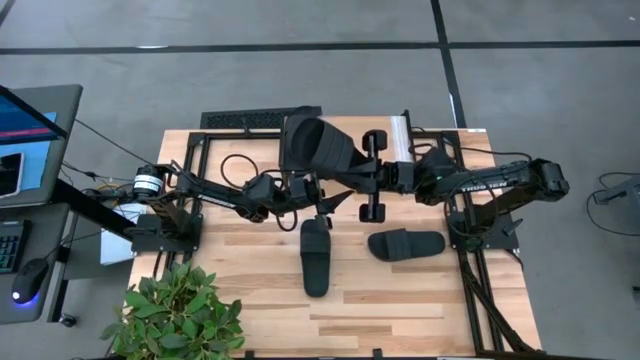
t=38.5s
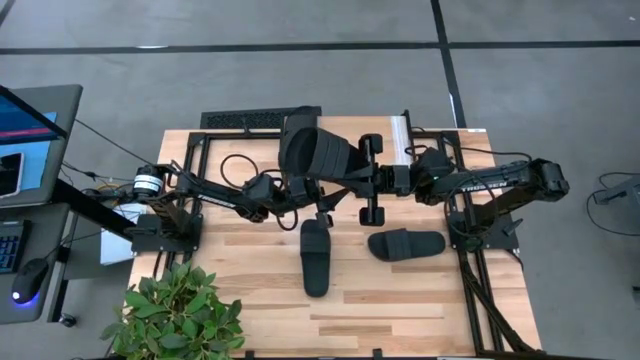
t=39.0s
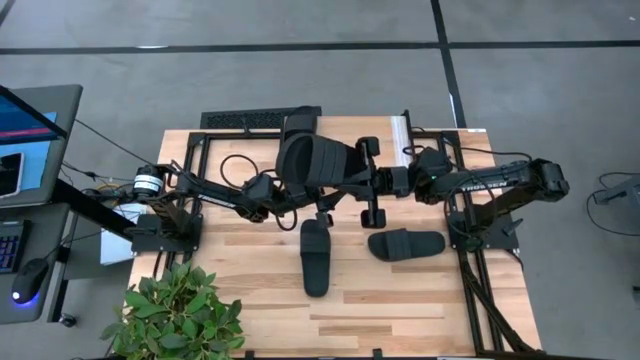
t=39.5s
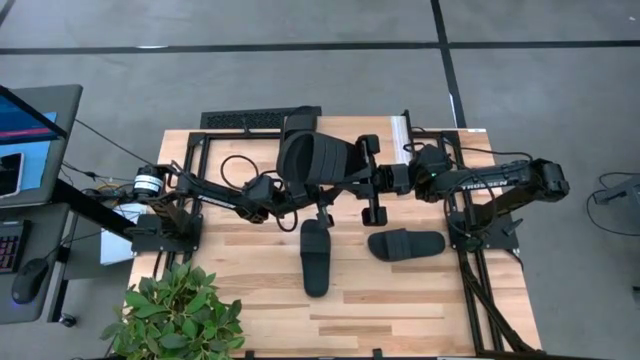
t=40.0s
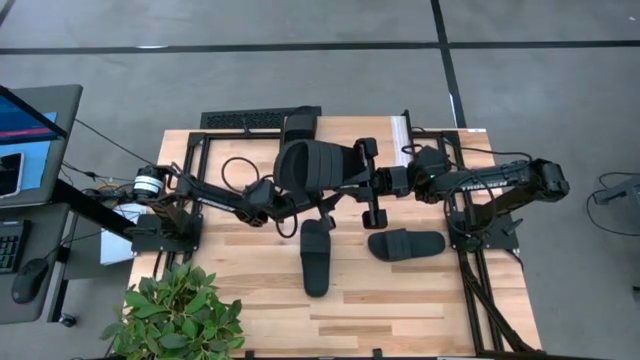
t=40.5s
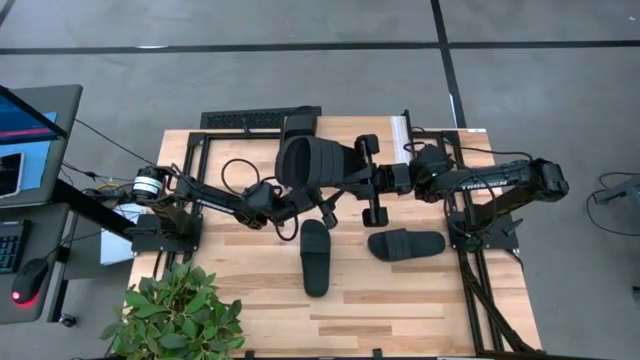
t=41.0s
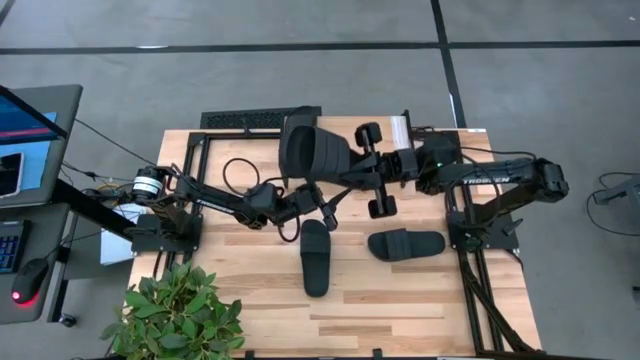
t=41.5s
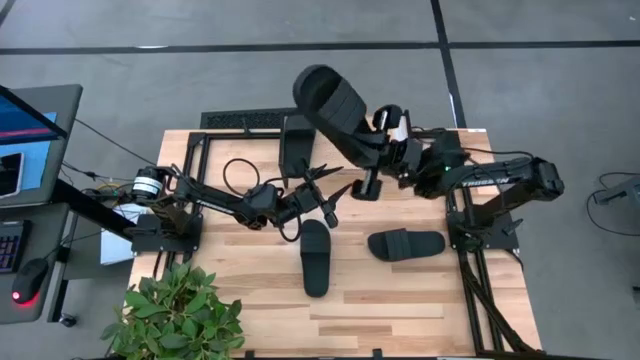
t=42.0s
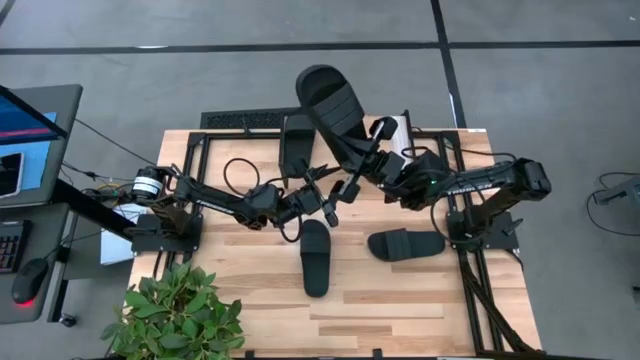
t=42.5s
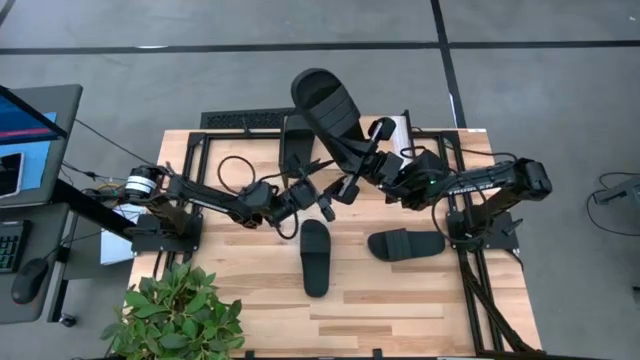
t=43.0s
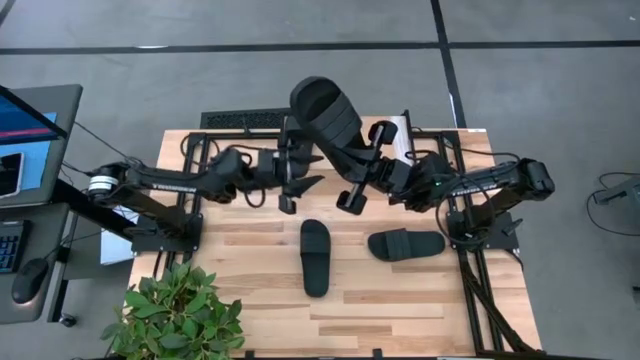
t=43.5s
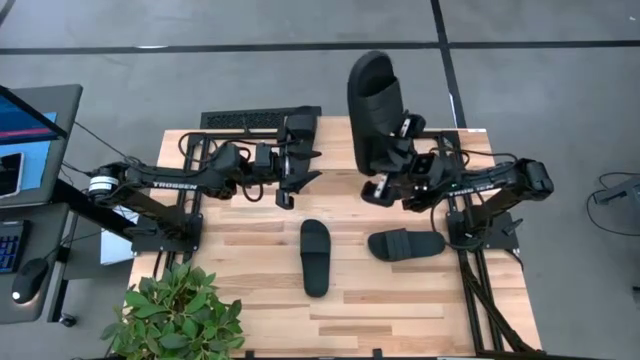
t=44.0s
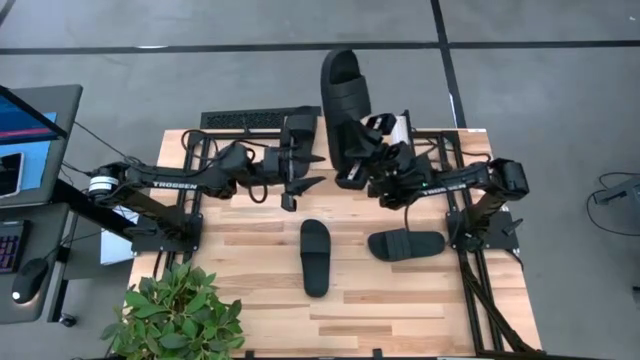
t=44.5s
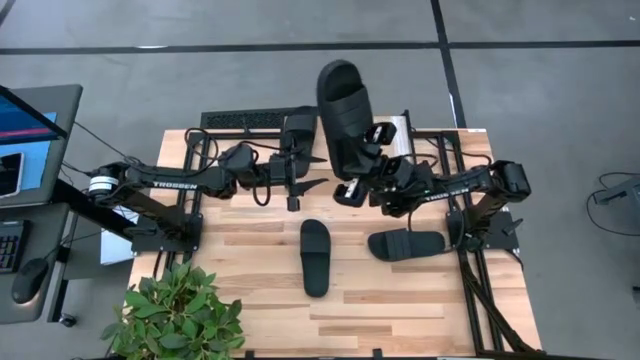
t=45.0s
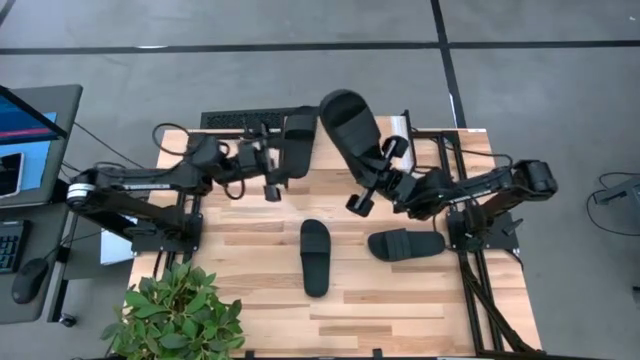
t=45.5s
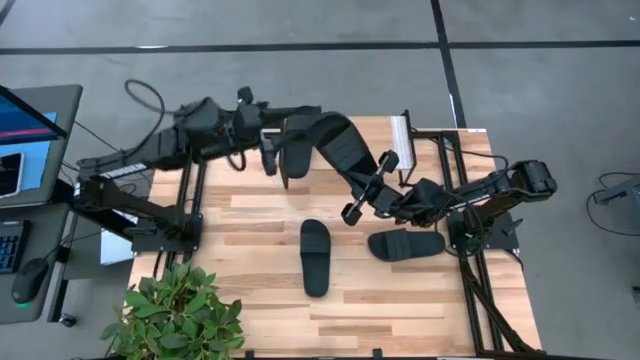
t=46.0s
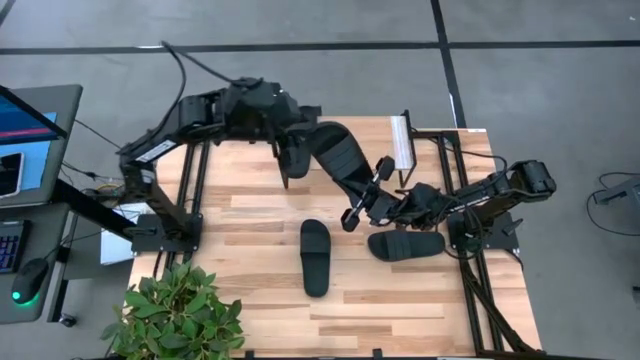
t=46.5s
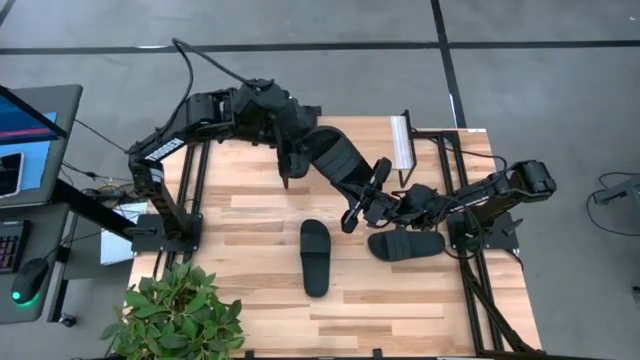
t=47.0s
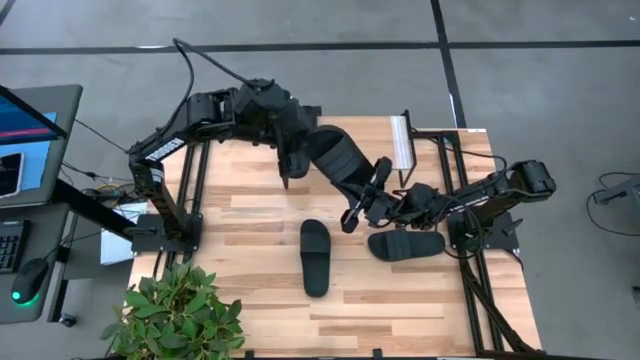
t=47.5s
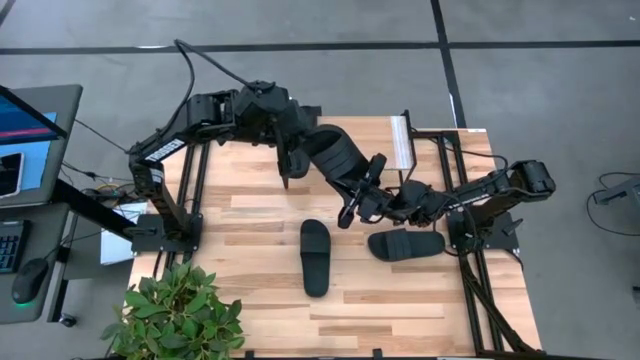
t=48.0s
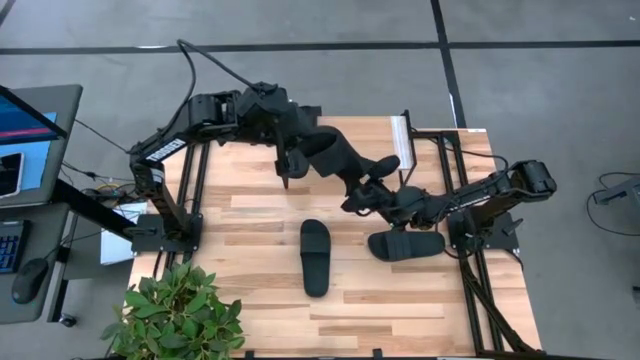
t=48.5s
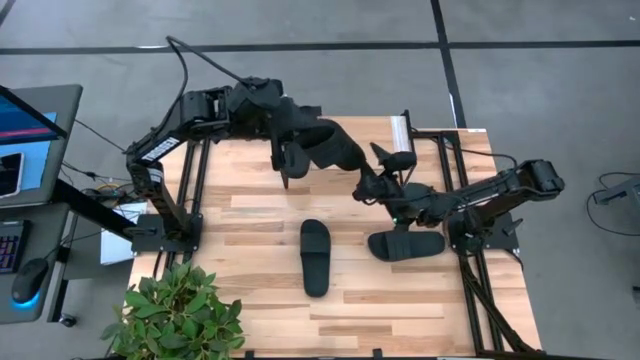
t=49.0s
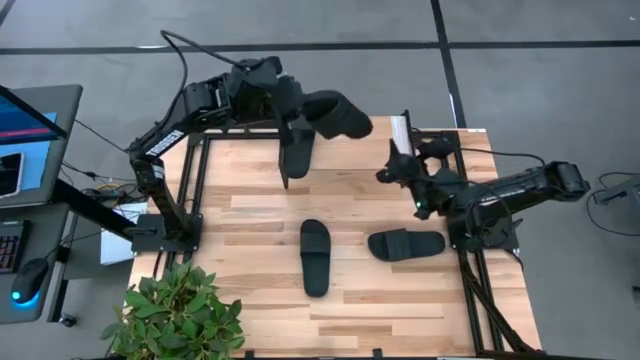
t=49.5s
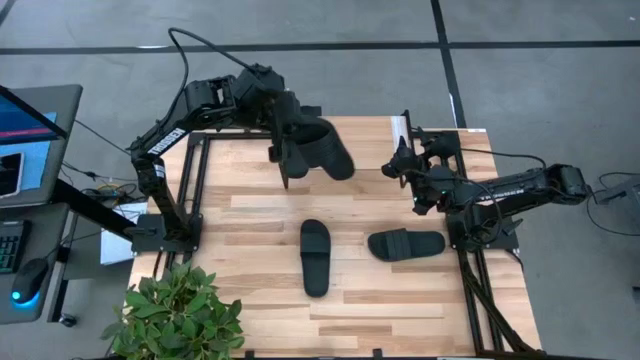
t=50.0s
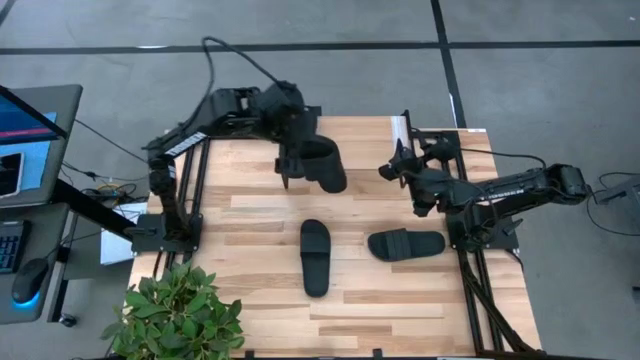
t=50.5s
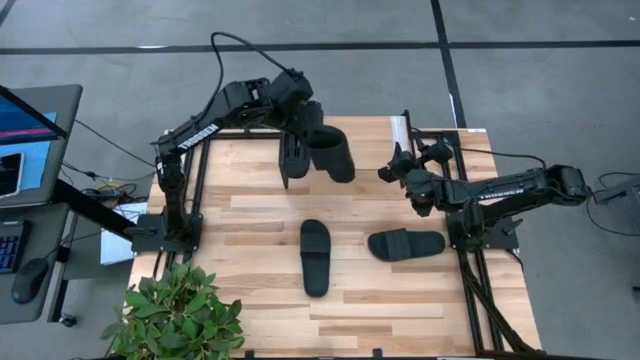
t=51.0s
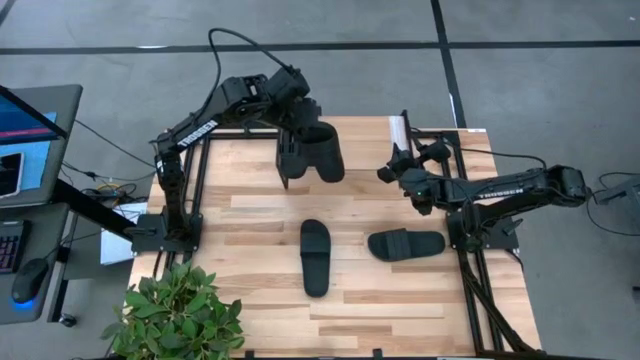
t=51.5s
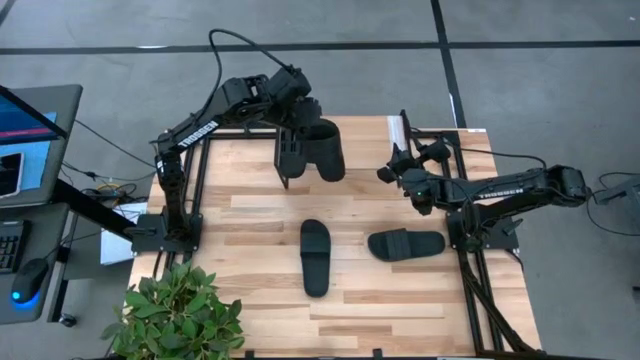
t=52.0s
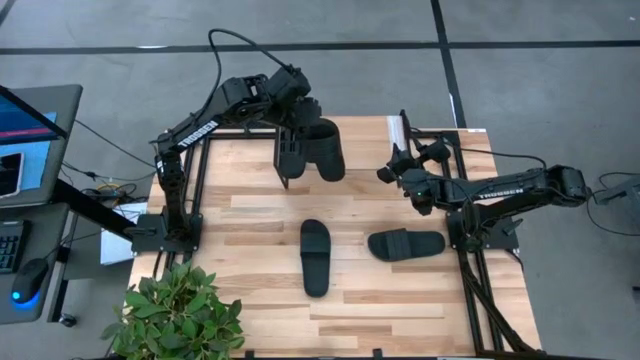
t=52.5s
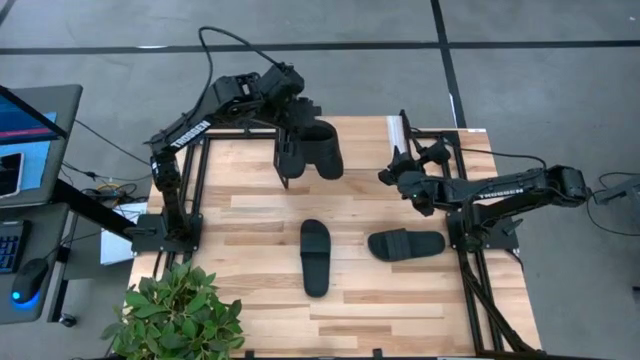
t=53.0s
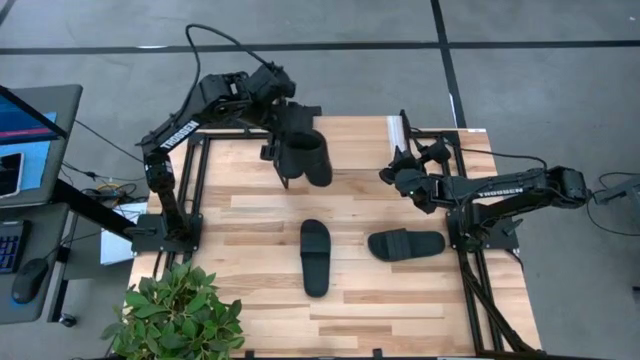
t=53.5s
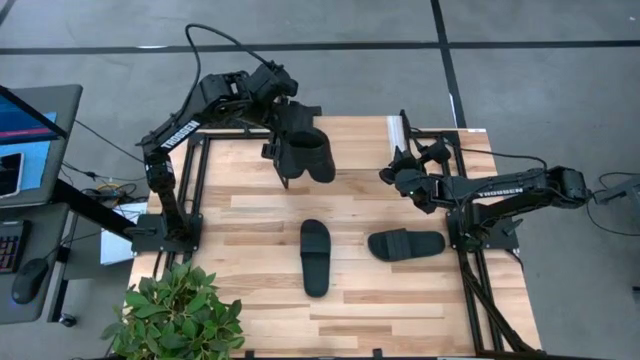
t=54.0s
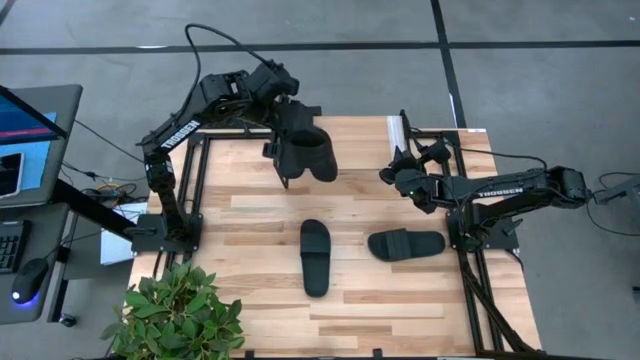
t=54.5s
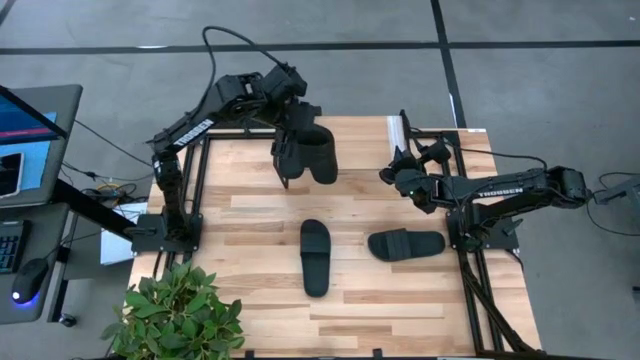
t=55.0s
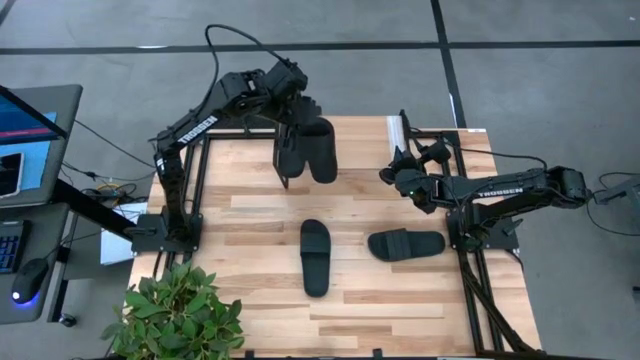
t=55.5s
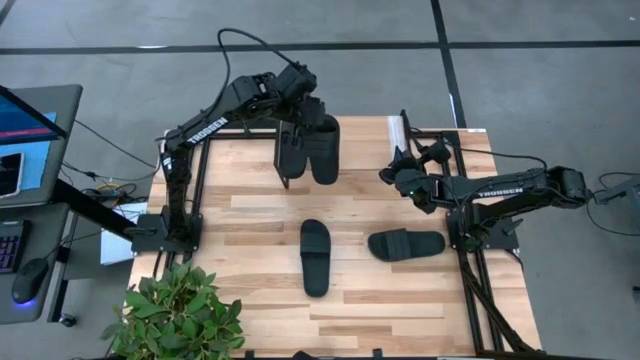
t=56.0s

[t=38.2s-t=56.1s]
Task: Pick and place slides into the shelf
Put the black slide on the shelf

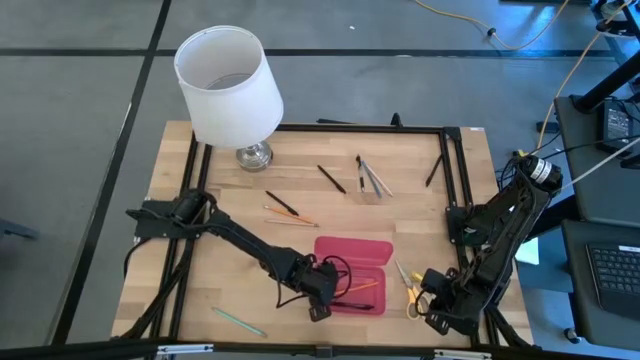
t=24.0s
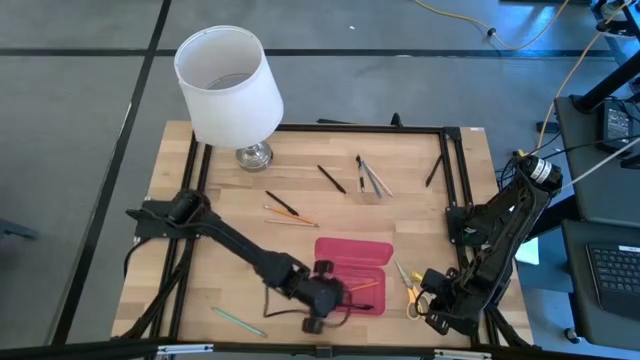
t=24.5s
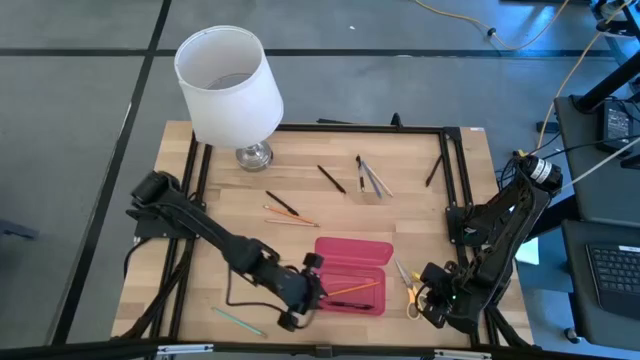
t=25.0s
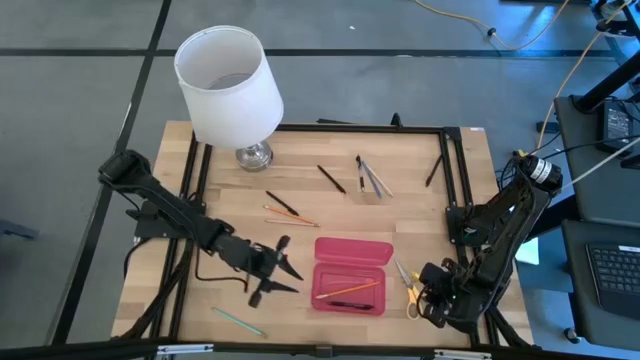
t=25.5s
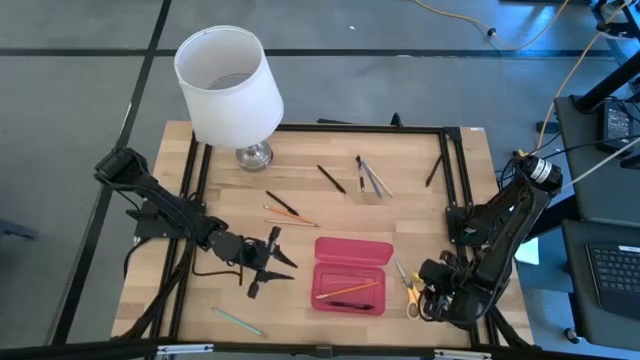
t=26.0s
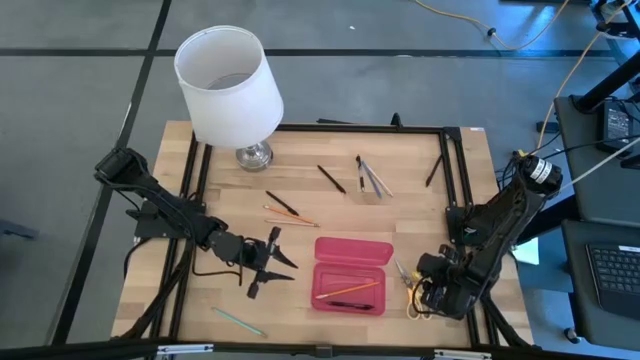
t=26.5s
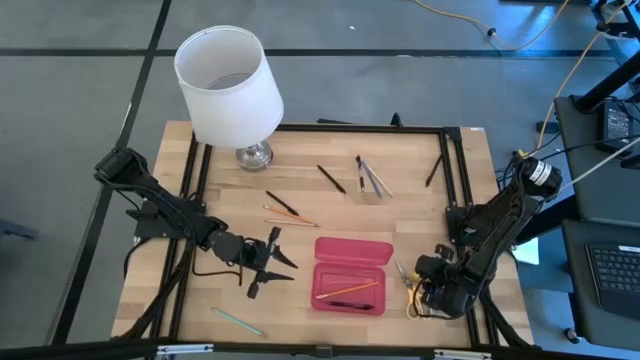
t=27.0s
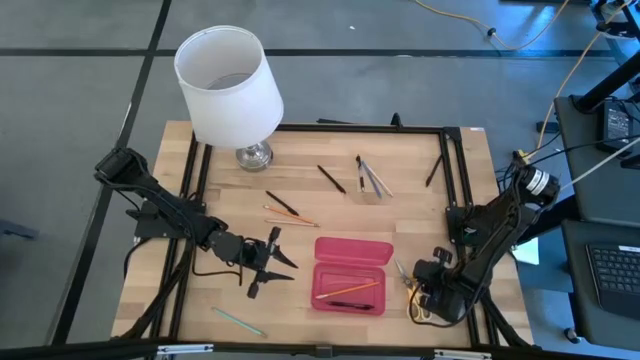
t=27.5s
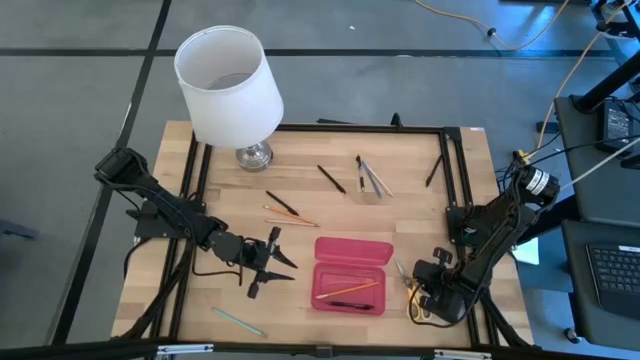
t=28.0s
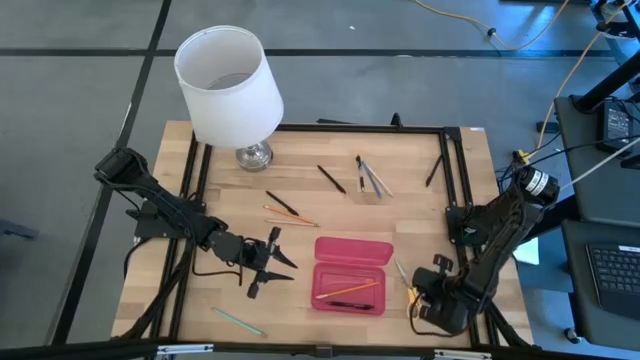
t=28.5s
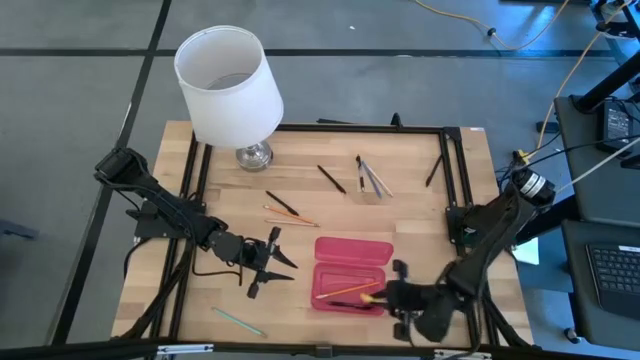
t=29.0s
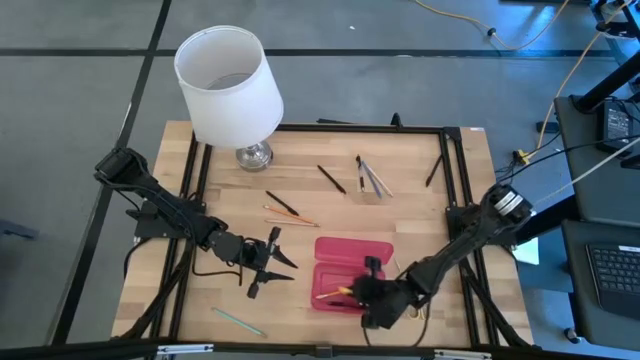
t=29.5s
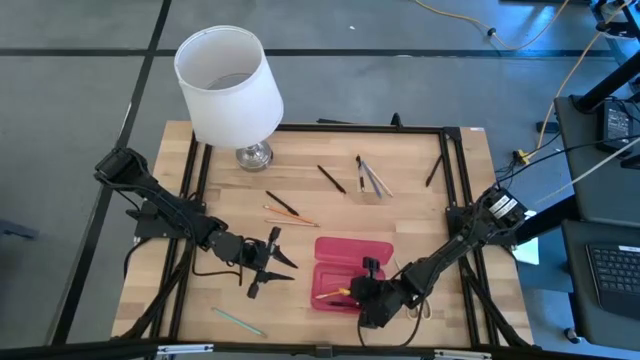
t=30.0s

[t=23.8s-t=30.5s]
Task: Pick & place school supplies into a supply box
Put the yellow pen into the pink supply box
